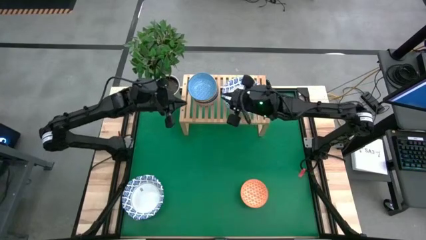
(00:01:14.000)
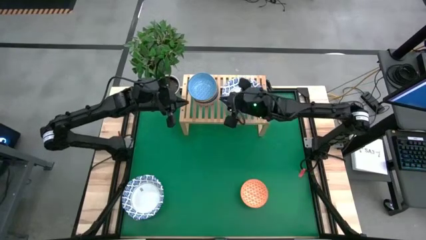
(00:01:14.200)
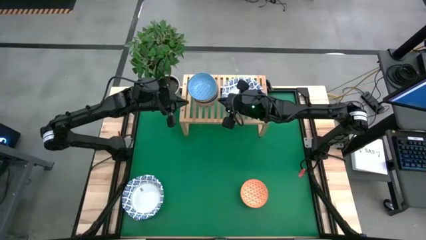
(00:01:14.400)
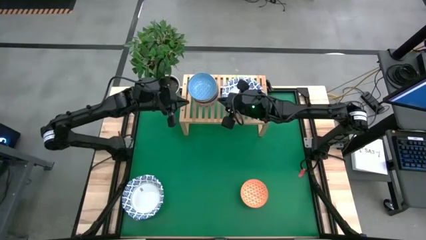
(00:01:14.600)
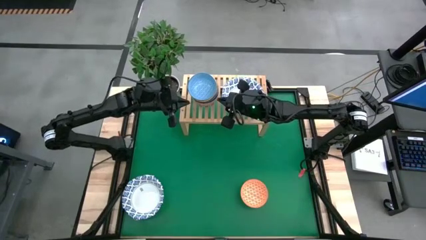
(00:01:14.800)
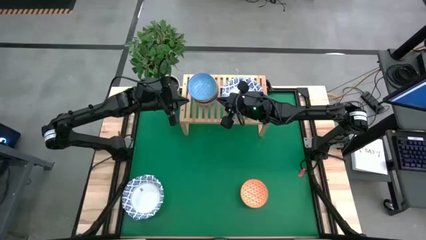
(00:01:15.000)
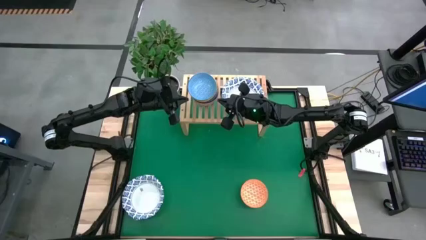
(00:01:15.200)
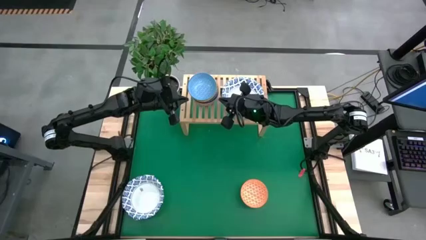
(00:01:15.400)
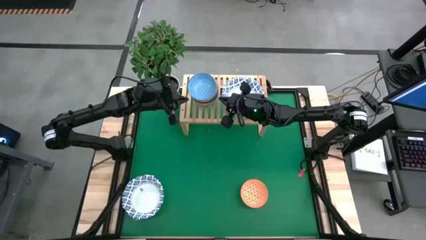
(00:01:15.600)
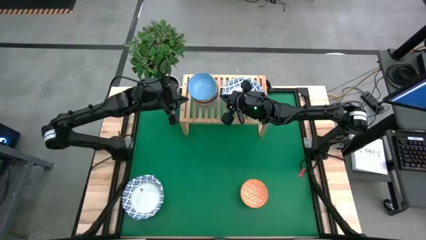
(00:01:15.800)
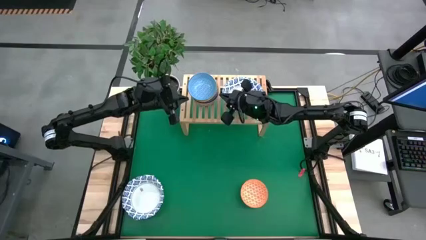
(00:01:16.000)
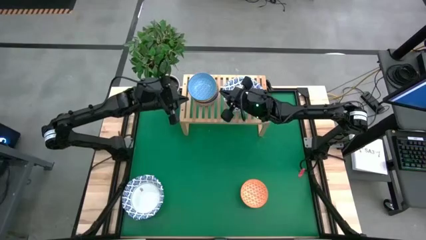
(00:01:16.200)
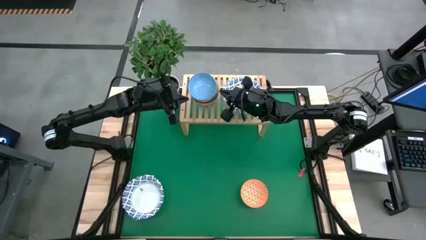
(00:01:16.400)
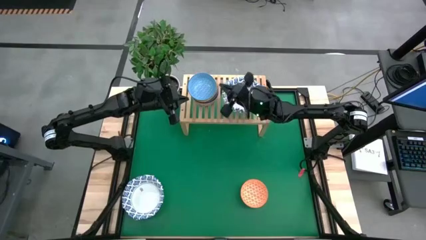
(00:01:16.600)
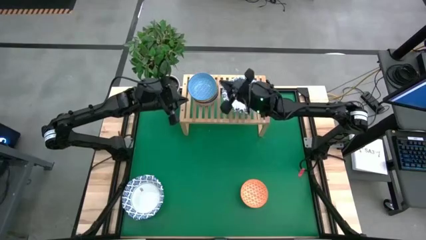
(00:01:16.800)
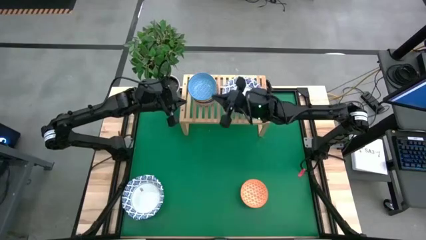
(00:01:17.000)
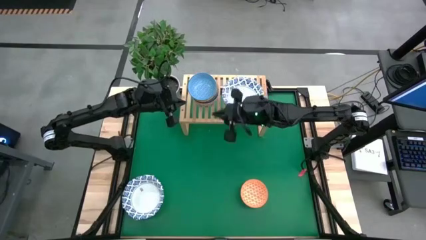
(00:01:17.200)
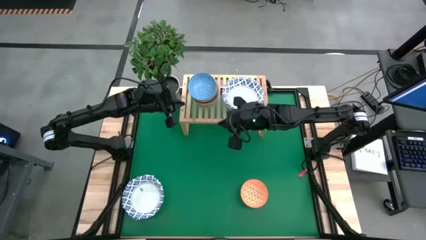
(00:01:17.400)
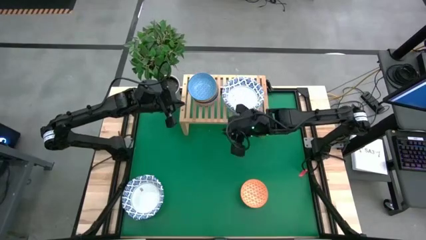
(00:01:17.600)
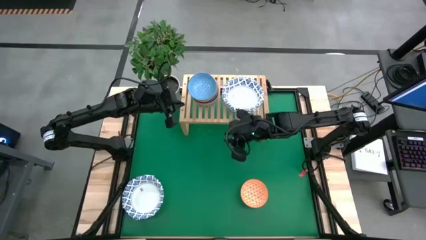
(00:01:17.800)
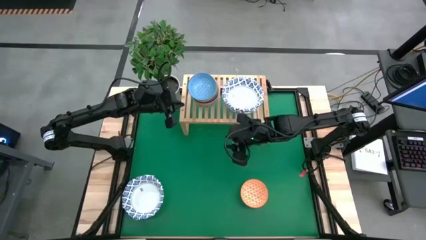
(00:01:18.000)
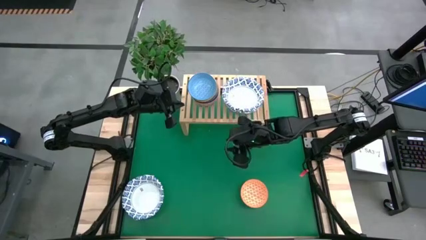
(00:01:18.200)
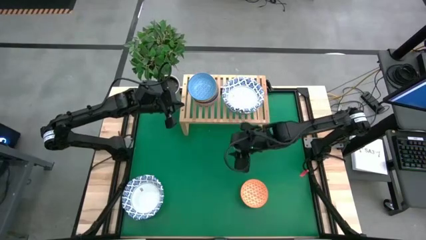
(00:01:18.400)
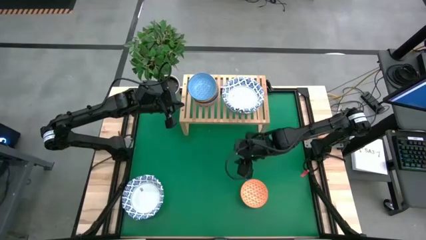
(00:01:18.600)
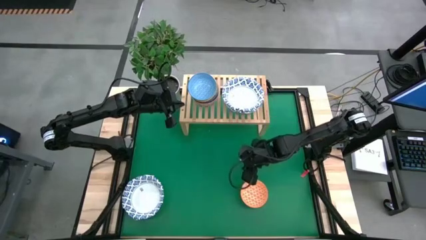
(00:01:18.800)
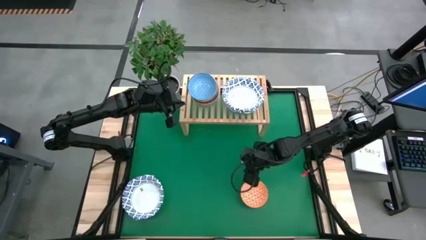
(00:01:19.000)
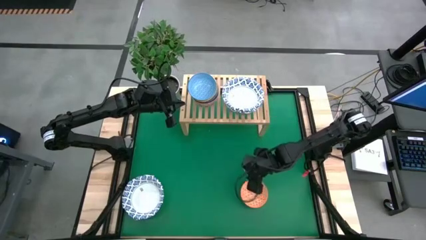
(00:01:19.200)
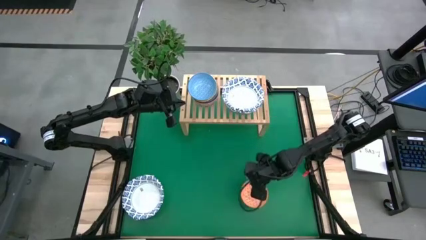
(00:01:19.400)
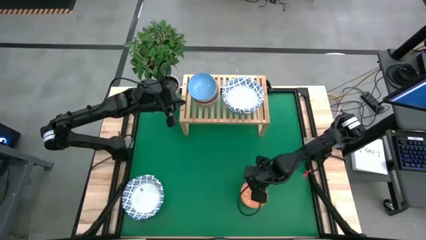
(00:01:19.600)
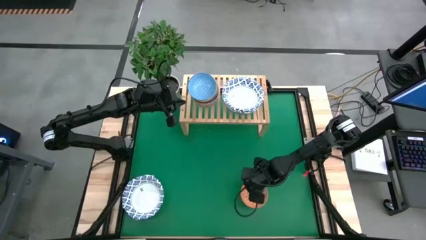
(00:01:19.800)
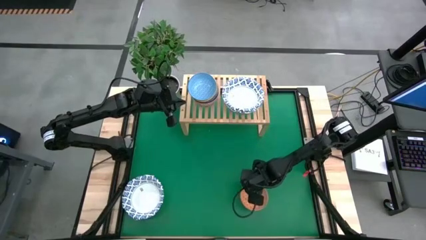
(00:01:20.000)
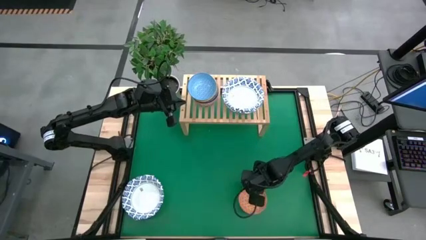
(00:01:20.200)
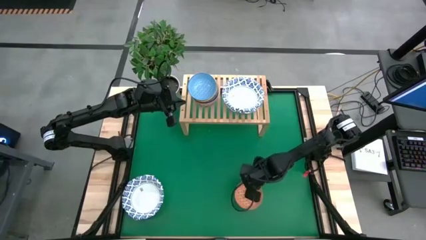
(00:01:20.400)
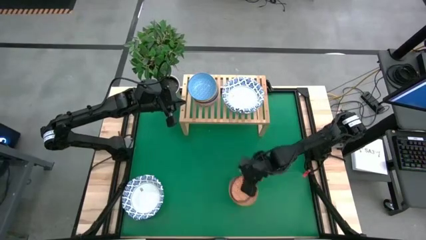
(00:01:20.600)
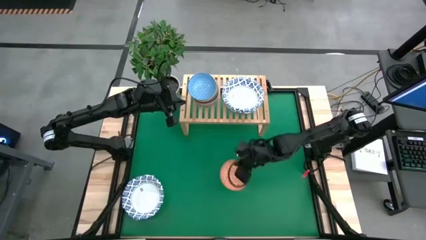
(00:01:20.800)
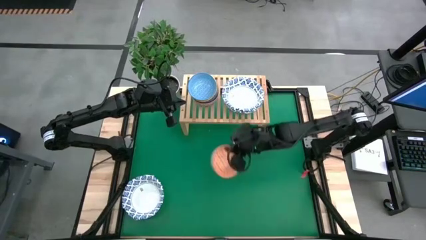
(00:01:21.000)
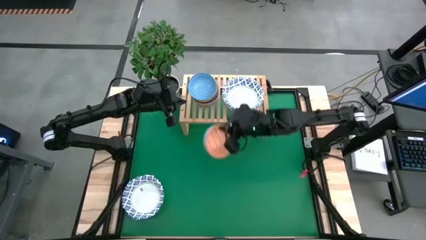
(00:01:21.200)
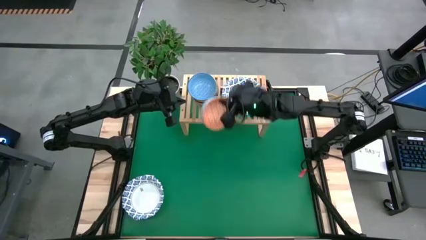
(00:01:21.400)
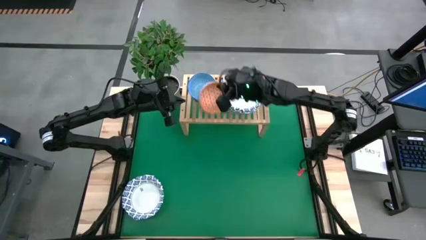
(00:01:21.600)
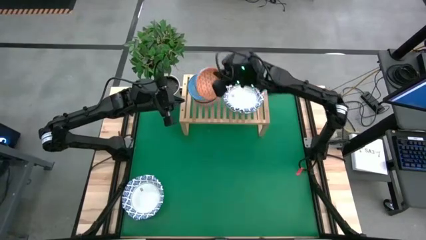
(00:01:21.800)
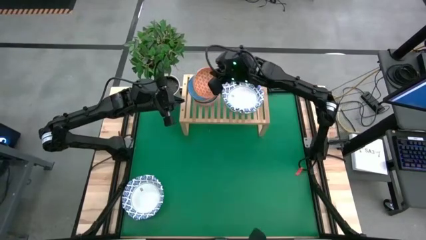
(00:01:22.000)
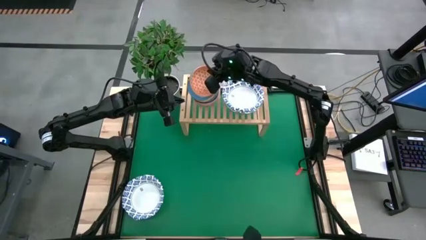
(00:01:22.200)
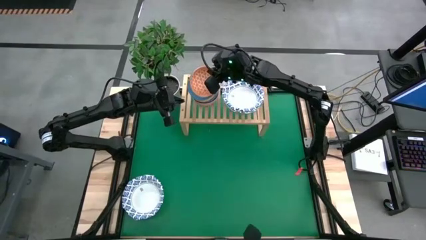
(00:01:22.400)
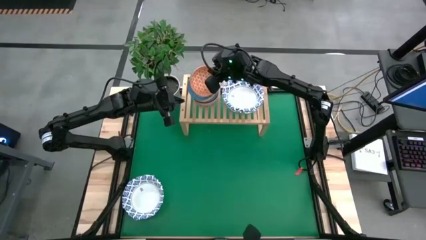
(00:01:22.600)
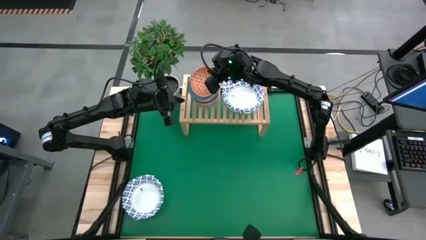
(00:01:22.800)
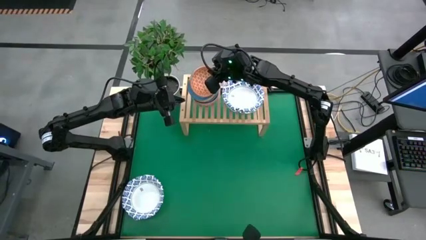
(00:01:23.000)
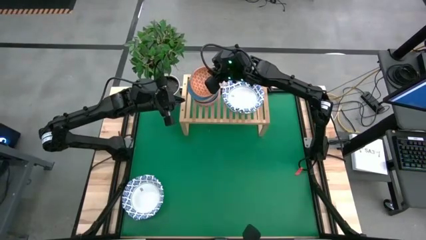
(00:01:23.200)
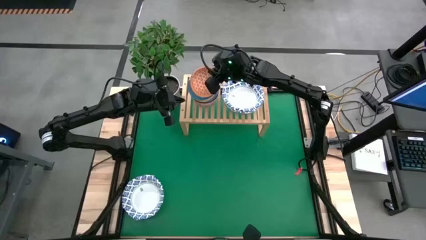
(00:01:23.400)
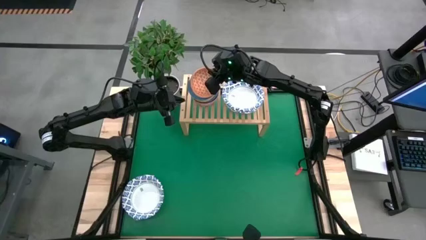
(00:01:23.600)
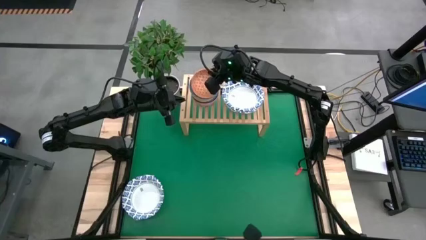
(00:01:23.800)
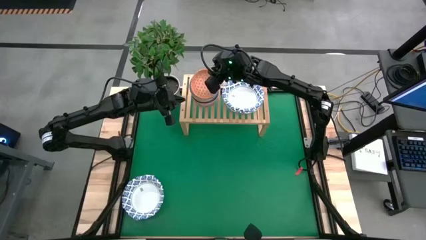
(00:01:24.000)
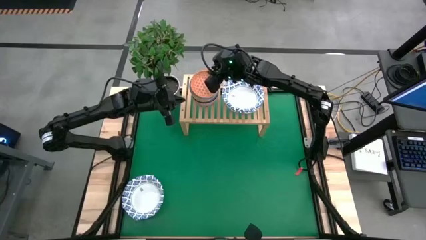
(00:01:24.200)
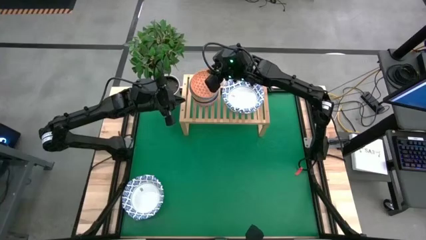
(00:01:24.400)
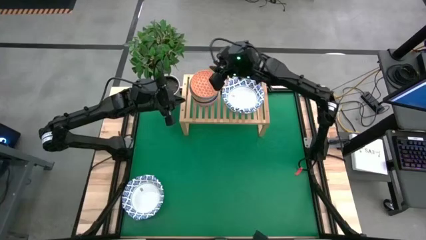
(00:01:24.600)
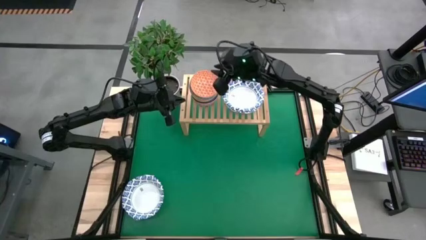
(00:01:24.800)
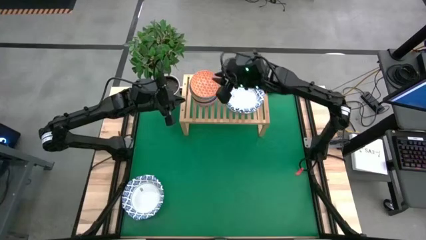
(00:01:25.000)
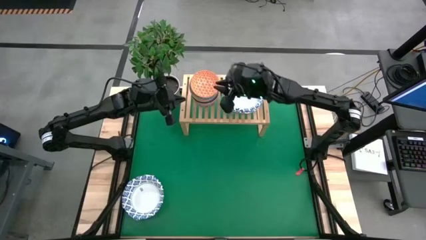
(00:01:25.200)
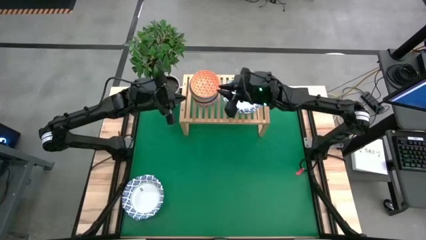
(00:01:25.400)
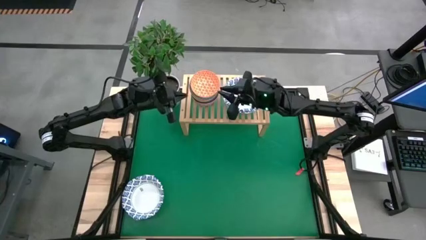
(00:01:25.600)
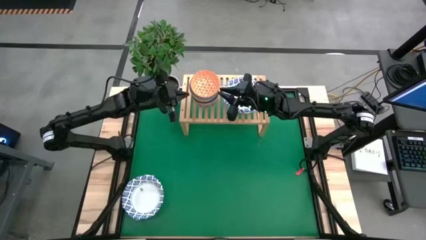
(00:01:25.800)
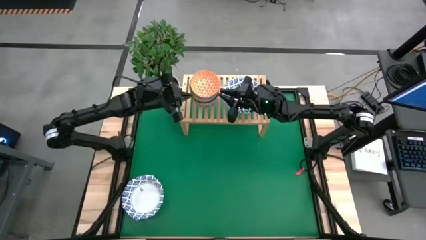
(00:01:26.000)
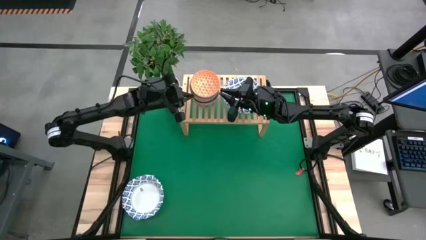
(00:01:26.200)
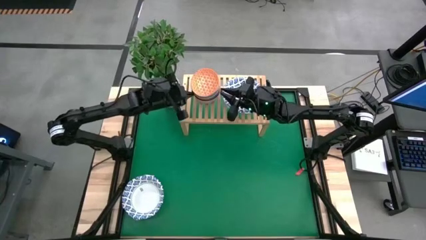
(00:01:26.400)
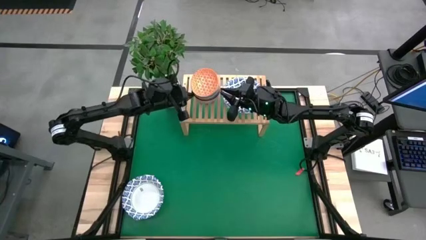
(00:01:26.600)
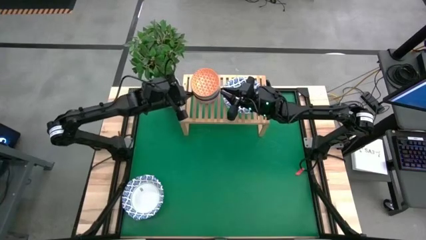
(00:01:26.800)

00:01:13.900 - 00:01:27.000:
Task: Place and stack bowls onto a shelf
Stack the orange bowl on top of the light blue bowl on the shelf

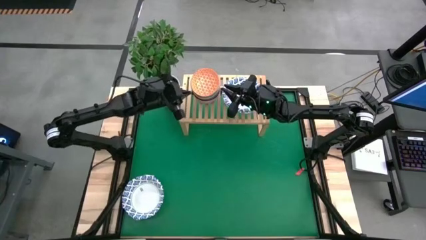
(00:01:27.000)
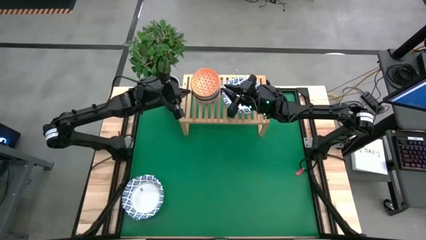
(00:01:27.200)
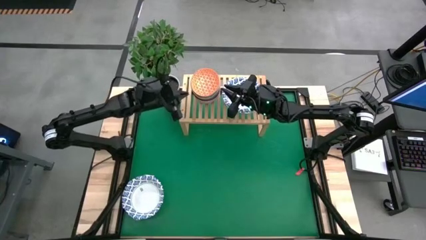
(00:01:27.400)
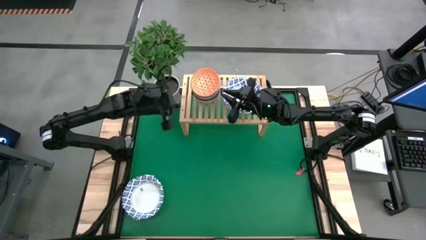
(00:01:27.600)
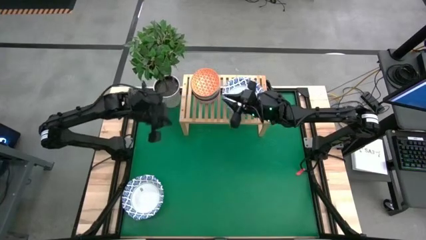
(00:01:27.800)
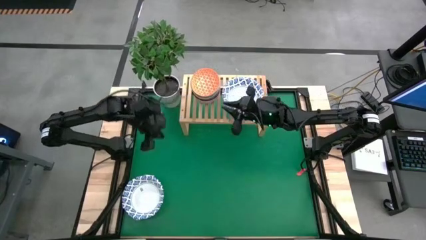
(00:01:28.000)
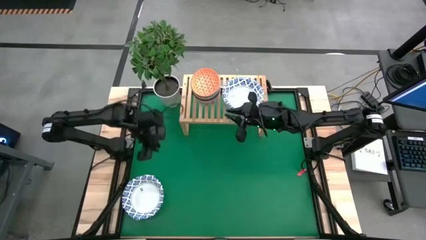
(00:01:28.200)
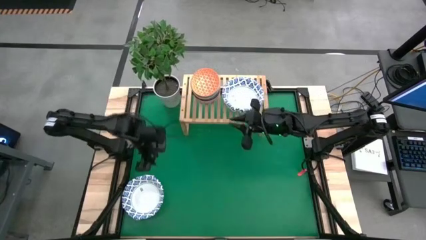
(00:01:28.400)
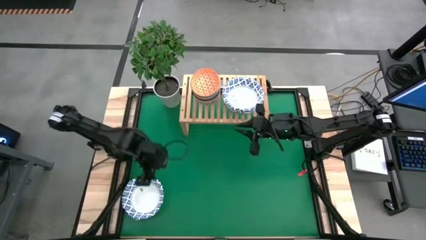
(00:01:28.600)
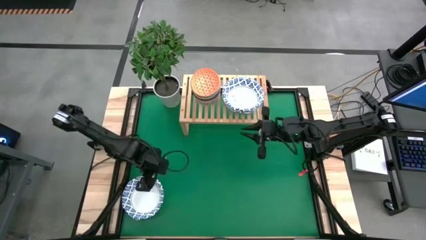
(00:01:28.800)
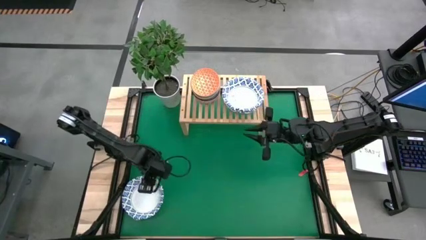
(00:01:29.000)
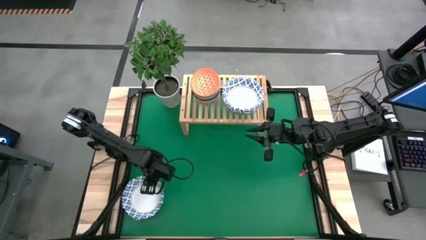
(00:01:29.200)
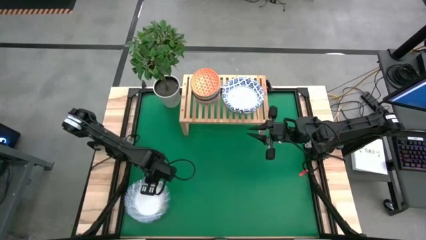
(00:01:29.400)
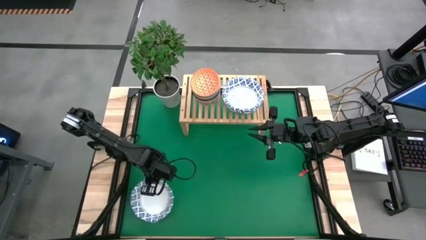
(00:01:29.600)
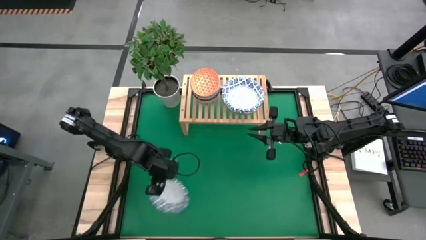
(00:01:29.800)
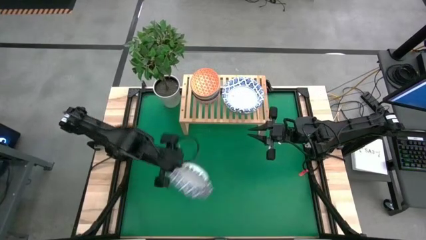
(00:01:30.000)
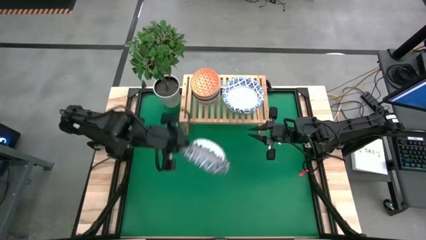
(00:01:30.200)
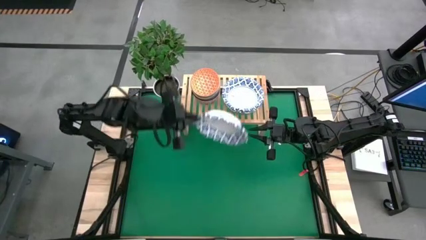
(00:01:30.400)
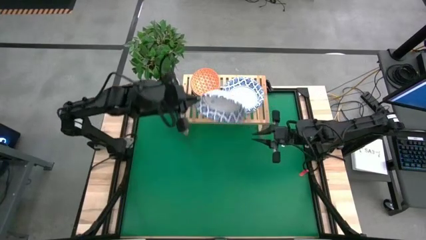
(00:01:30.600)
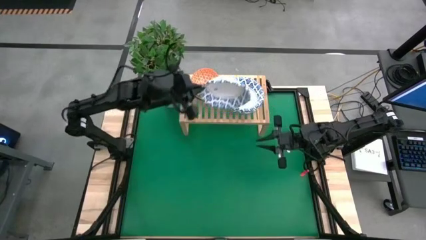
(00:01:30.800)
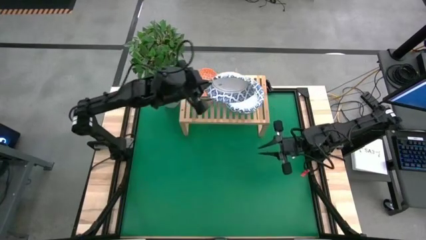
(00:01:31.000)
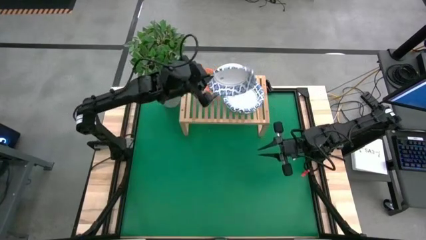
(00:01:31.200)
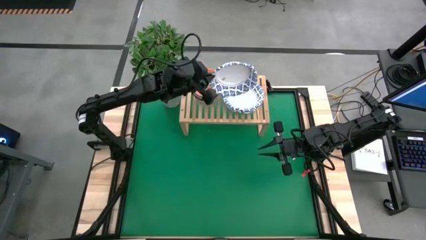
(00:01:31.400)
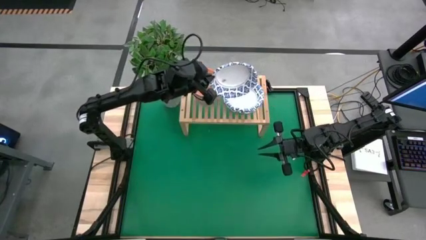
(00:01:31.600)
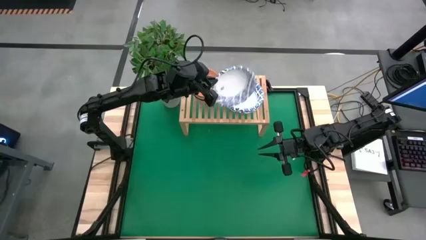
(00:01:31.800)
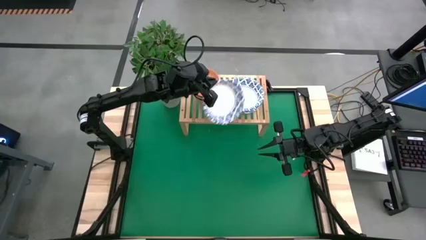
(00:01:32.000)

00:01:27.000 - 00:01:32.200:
Stack the white bowl on top of the white bowl on the shelf
